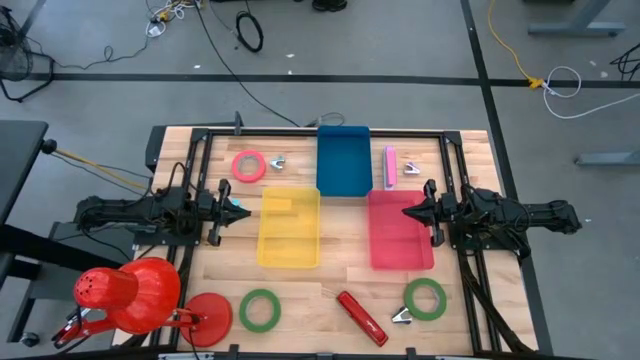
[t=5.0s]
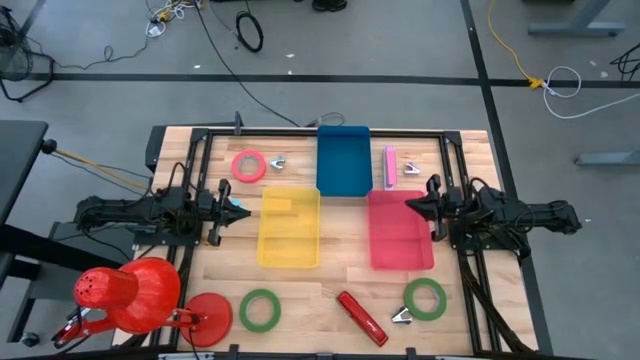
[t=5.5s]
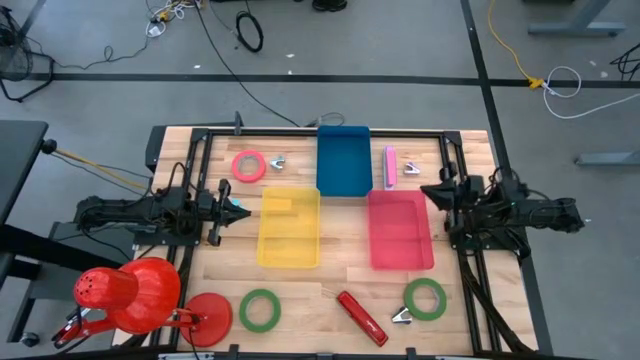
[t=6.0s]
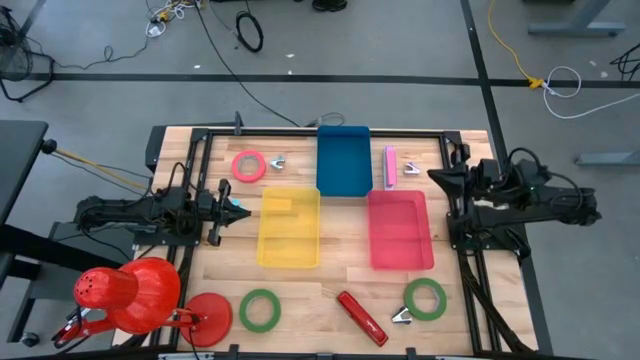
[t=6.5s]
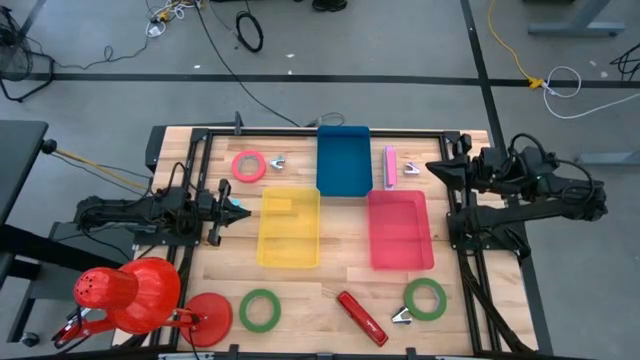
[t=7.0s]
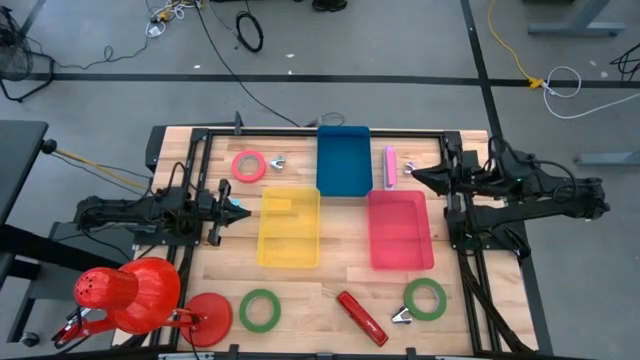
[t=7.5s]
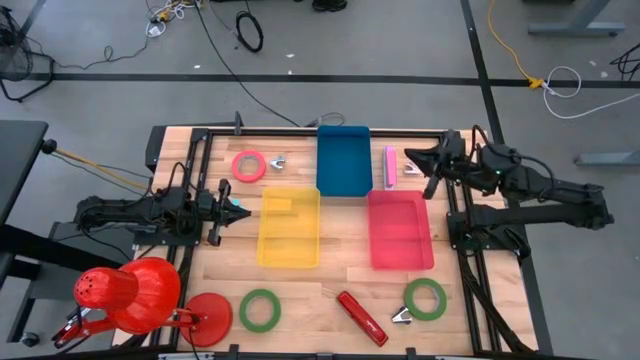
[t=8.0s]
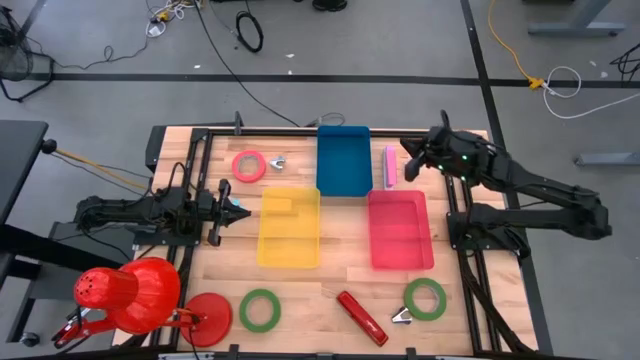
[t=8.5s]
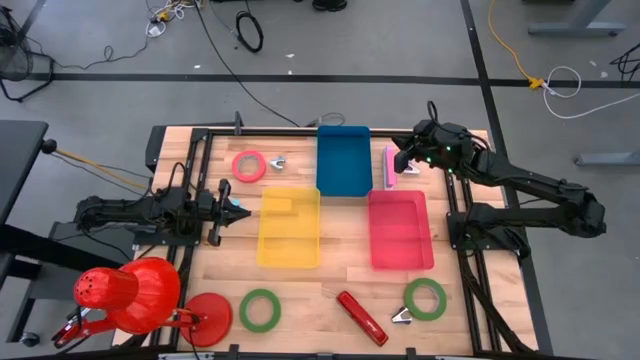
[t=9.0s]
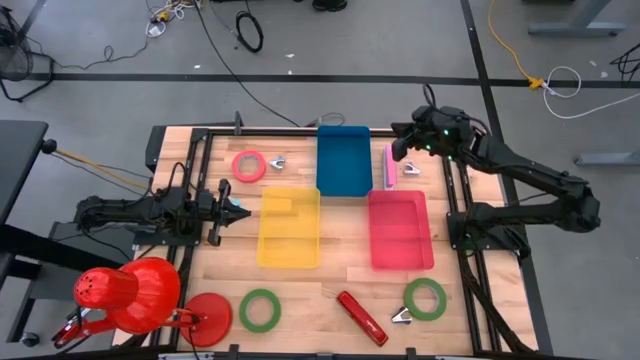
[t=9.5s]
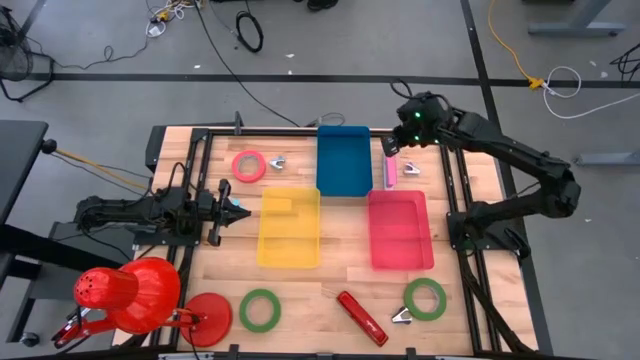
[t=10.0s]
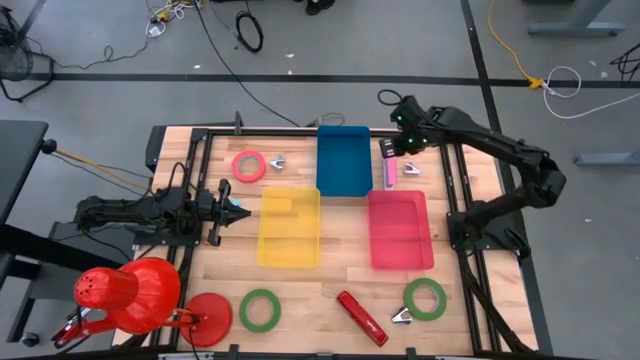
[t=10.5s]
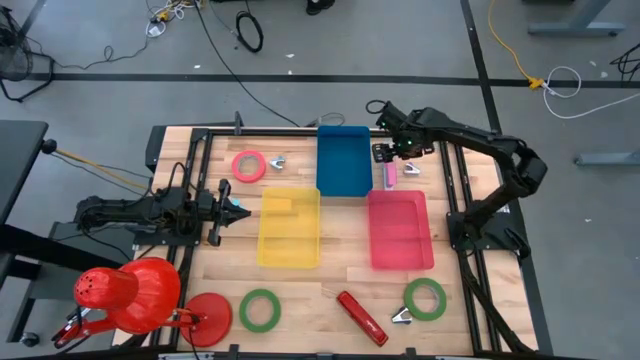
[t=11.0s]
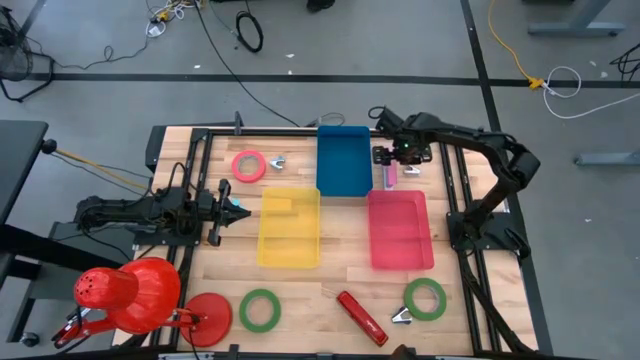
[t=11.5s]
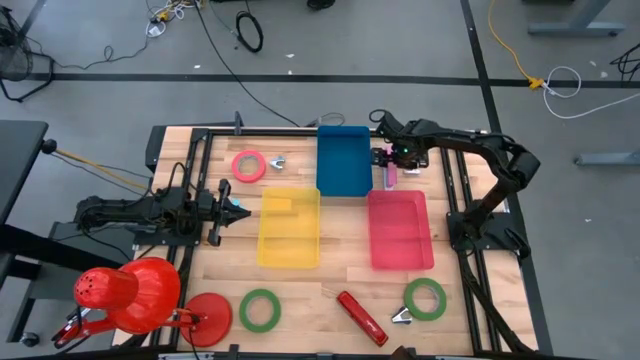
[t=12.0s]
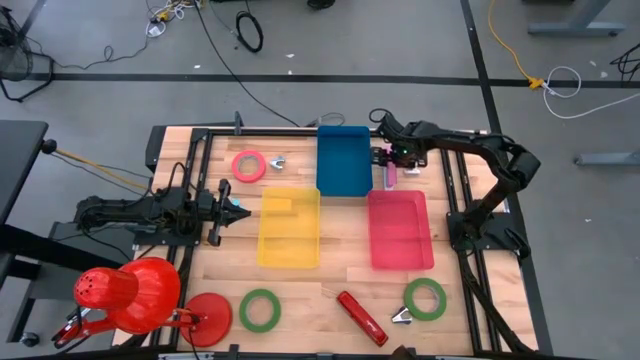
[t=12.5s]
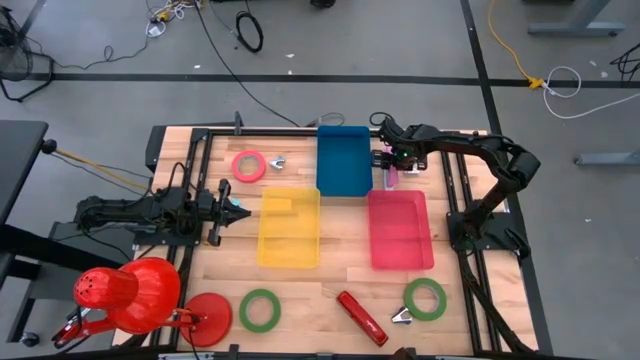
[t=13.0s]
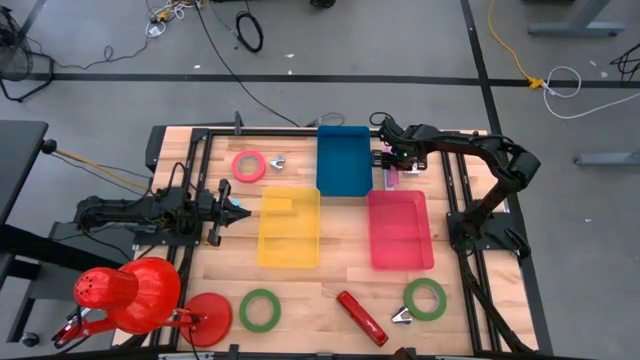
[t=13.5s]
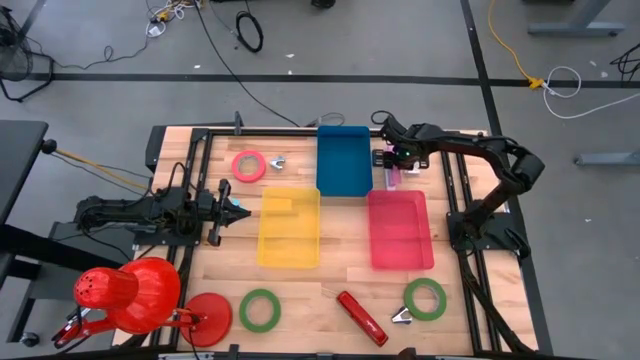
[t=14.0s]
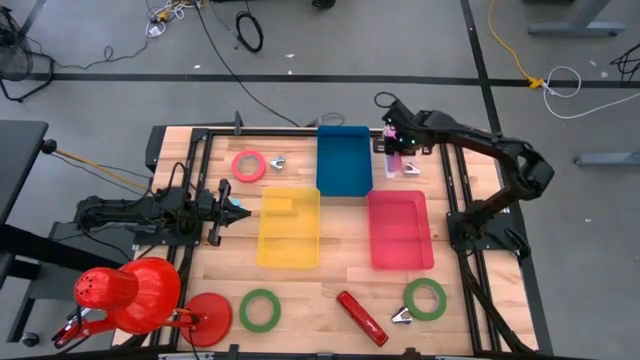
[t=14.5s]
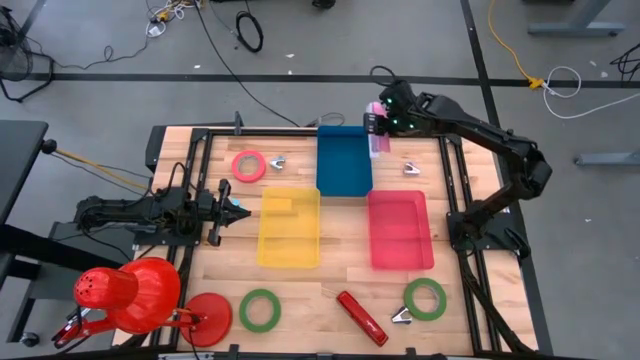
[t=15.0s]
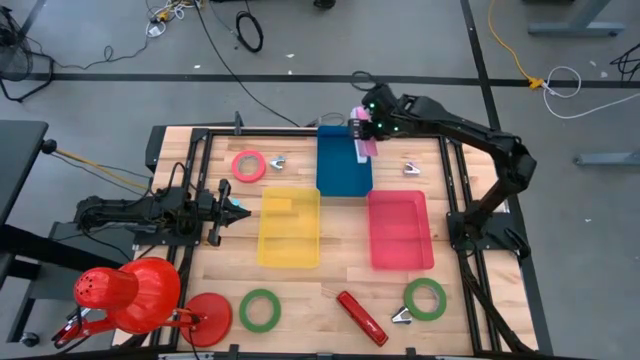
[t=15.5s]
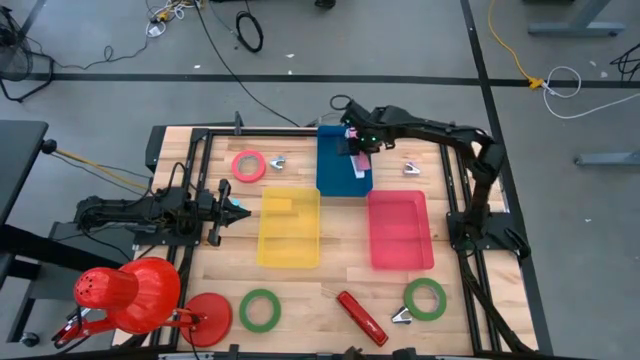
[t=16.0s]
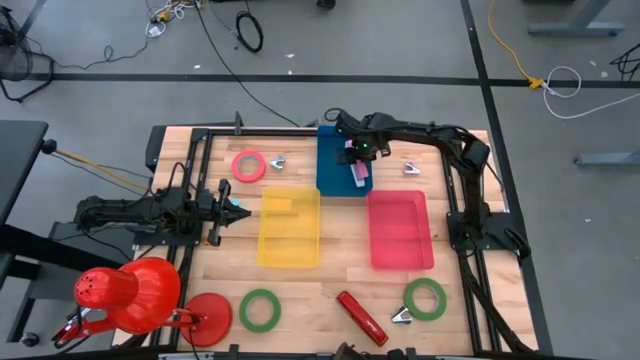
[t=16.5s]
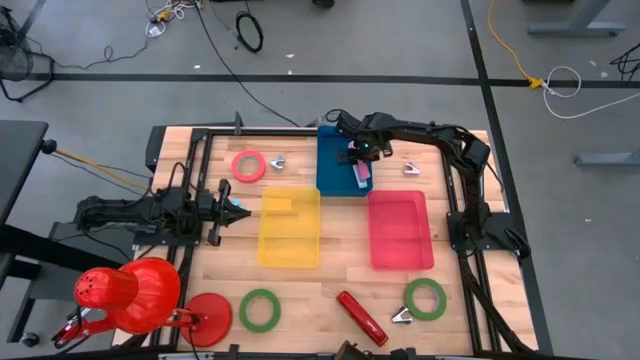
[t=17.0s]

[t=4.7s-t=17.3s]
Task: Pick and place Stapler, Stapler remover, tape
Put the pink stapler into the blue bin

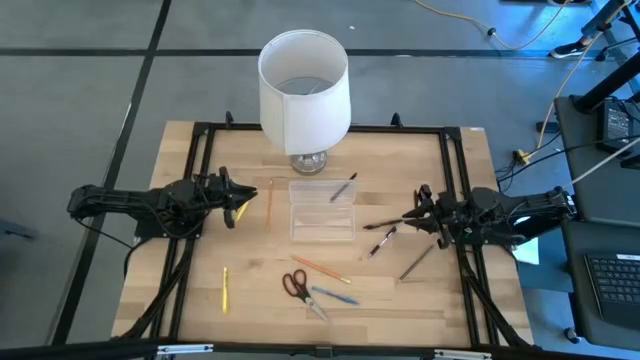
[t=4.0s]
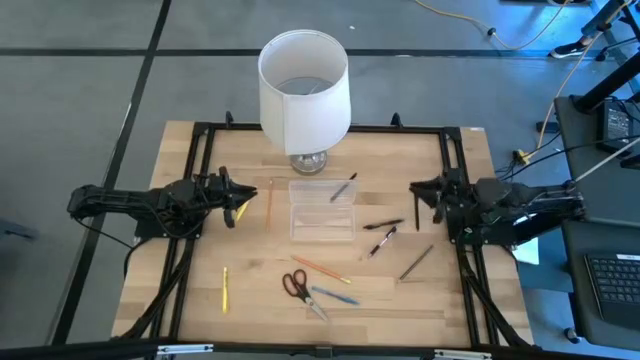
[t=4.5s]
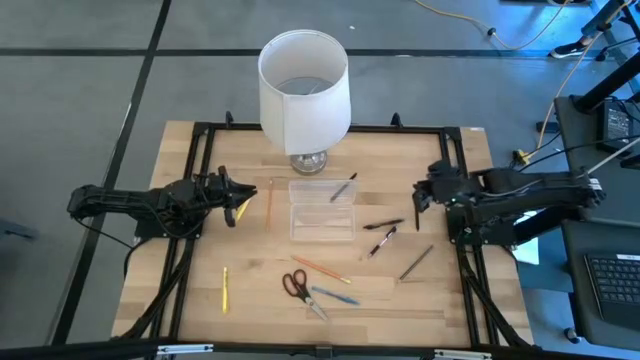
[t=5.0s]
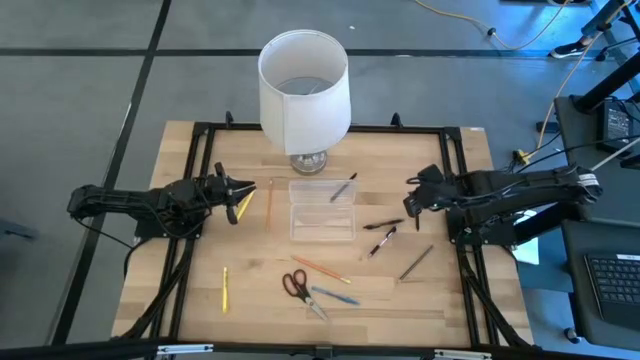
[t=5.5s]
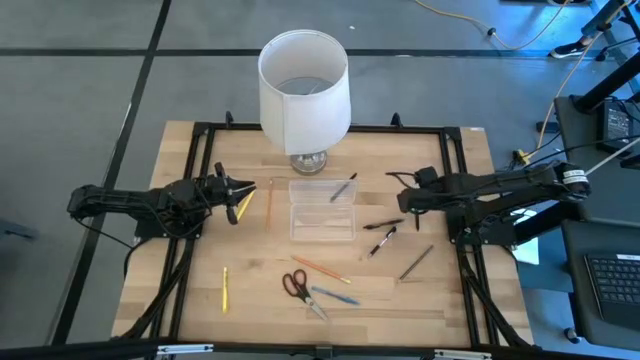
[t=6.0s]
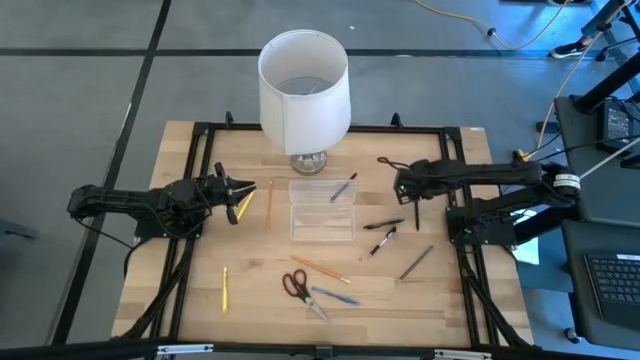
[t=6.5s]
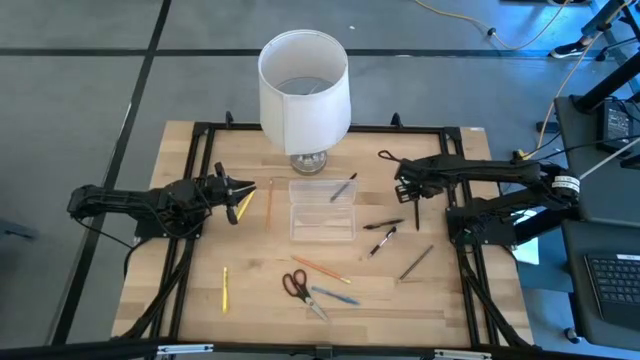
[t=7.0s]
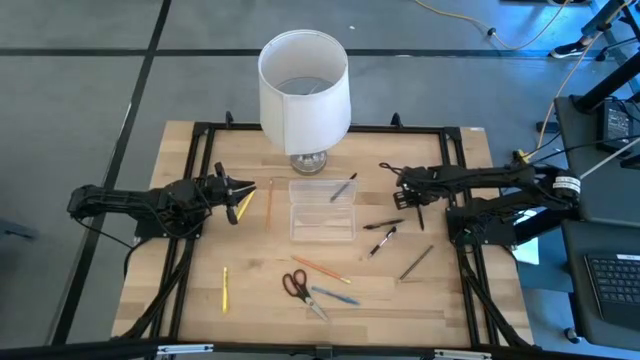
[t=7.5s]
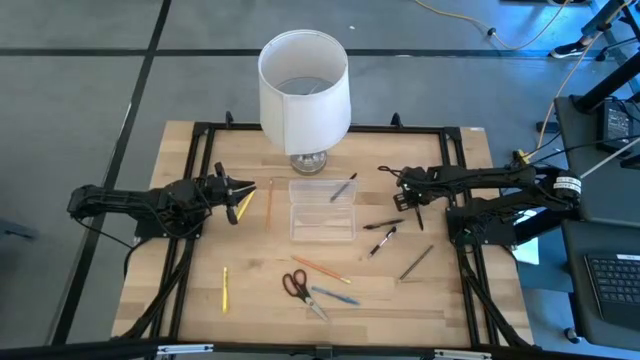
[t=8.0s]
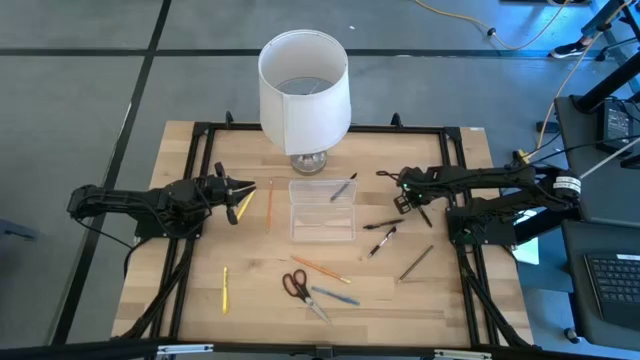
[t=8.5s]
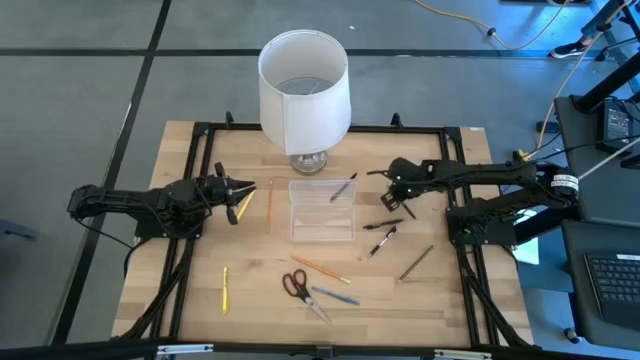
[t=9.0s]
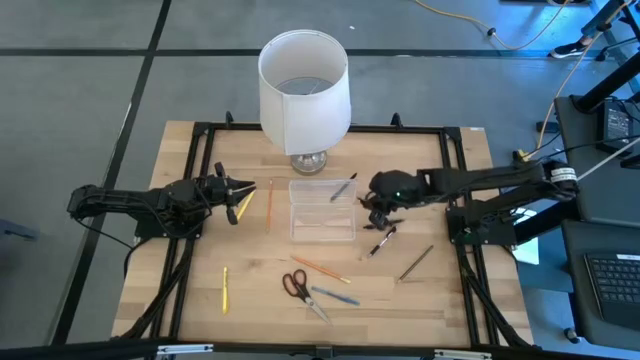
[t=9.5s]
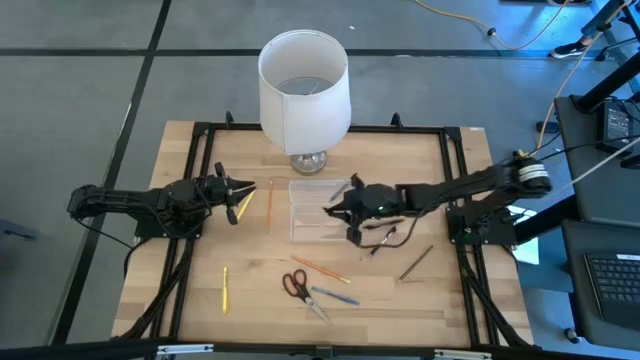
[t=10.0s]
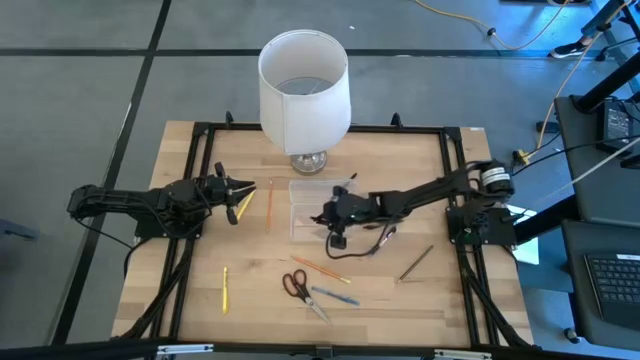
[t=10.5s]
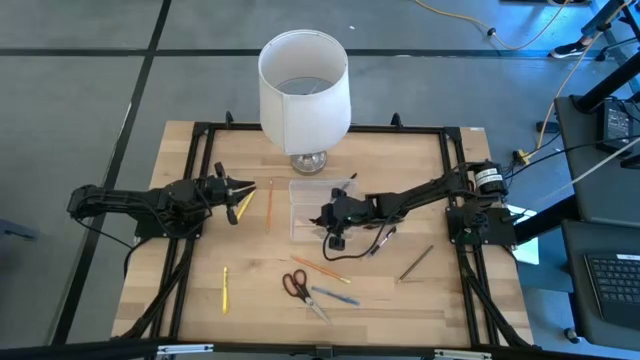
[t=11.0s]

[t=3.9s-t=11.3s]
Task: Pick & place school supplies into a supply box
Put the black pen into the transparent supply box
